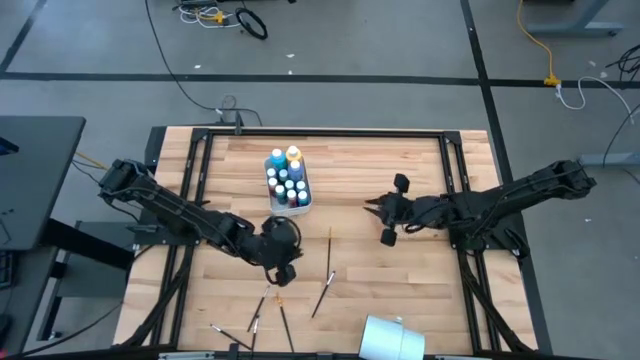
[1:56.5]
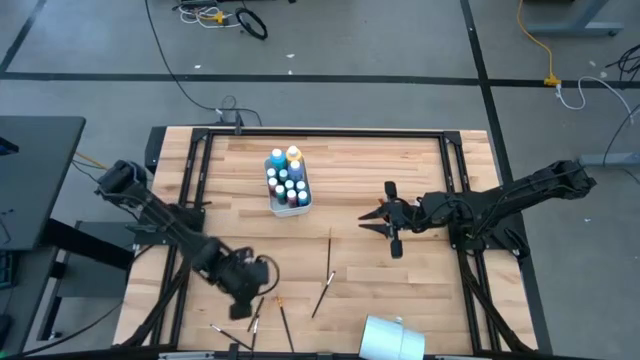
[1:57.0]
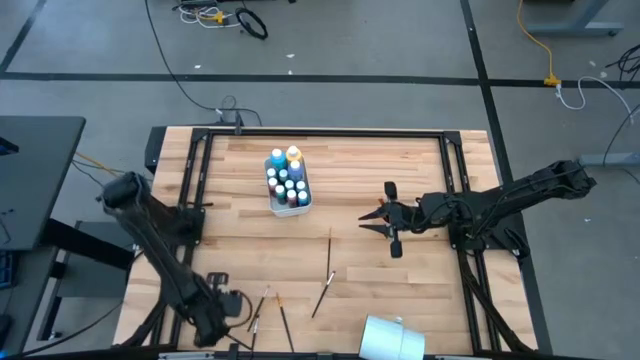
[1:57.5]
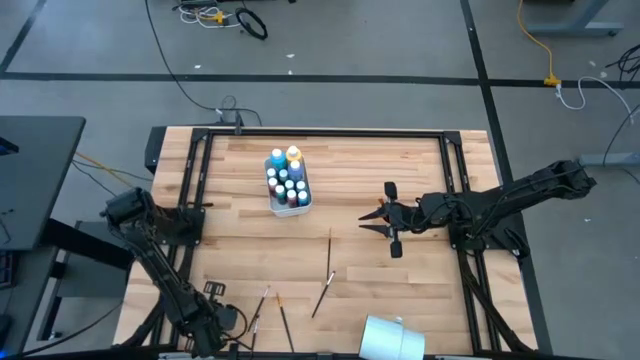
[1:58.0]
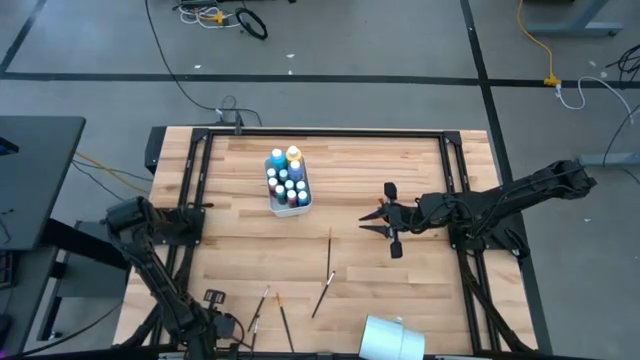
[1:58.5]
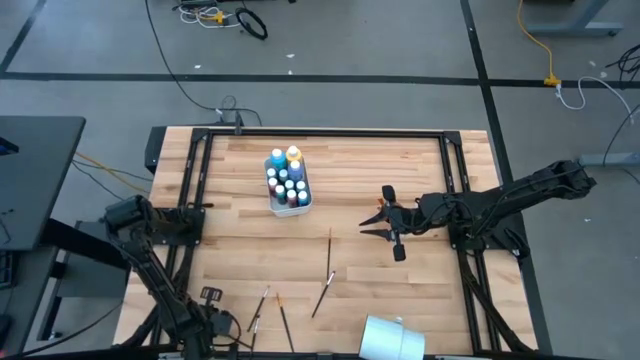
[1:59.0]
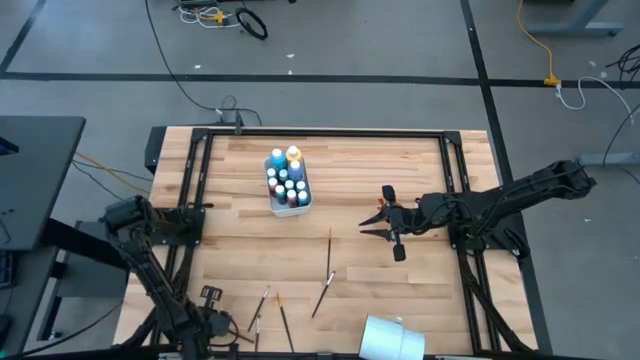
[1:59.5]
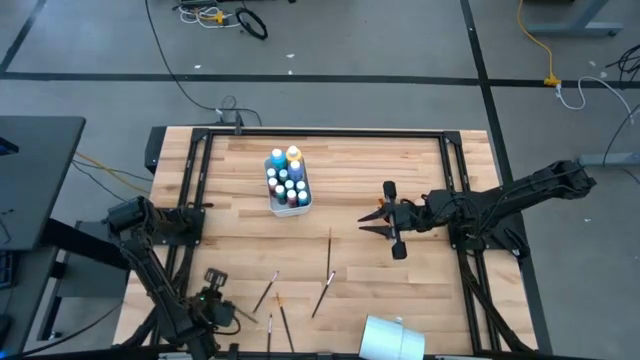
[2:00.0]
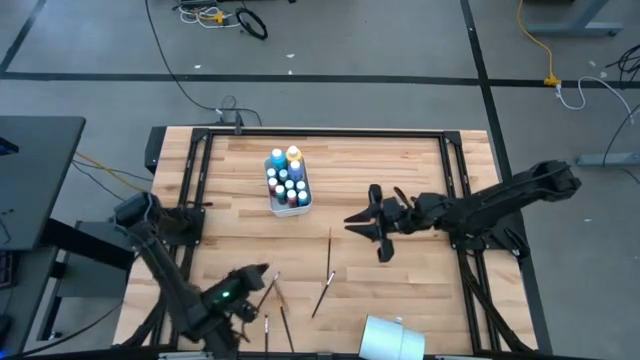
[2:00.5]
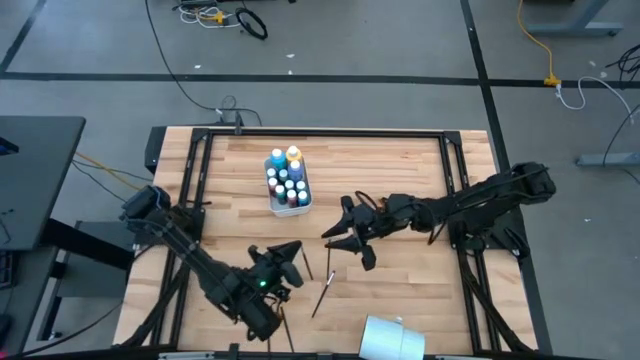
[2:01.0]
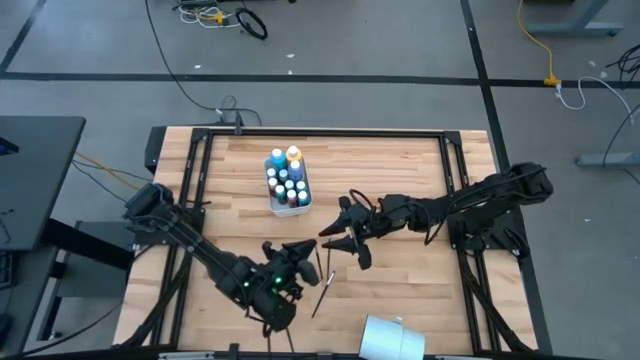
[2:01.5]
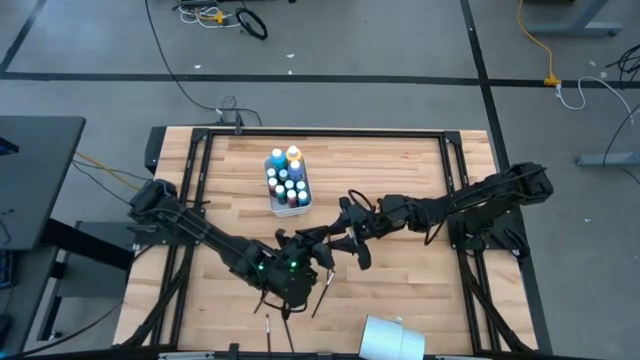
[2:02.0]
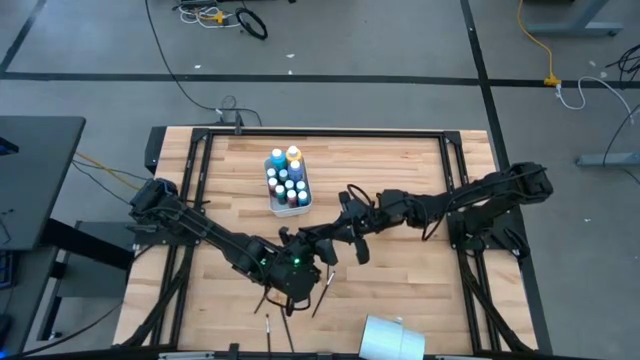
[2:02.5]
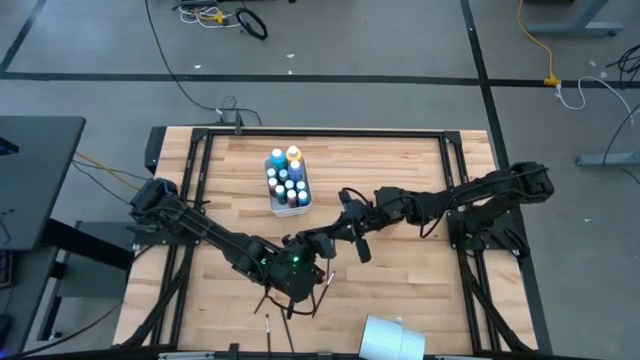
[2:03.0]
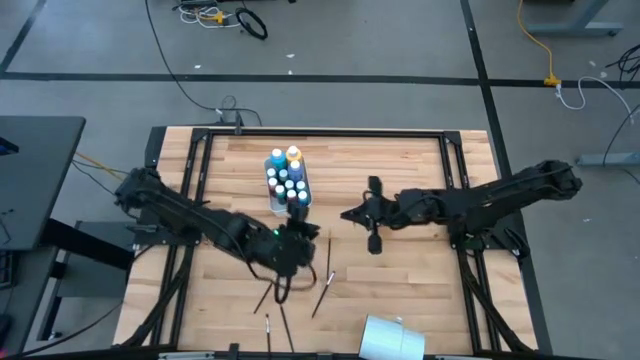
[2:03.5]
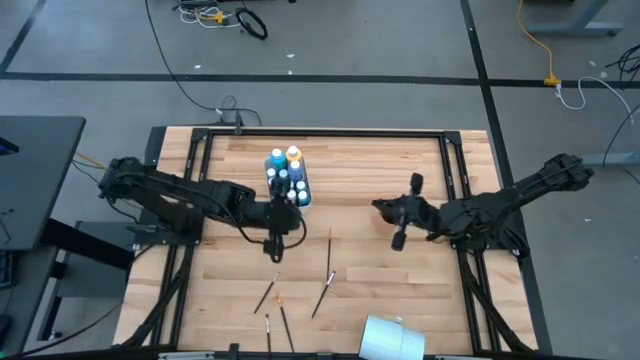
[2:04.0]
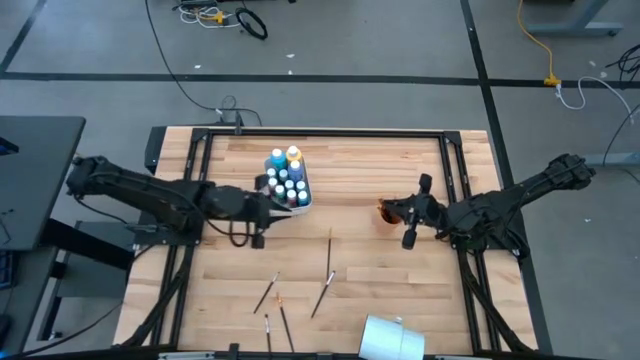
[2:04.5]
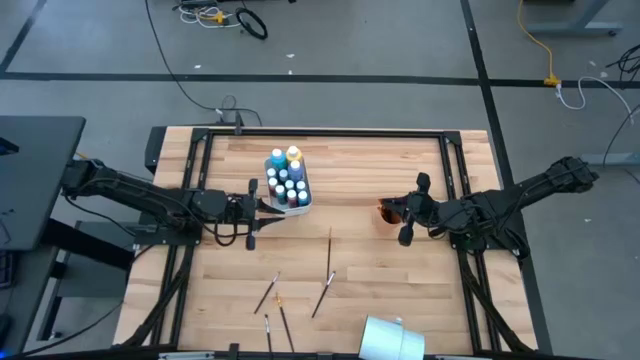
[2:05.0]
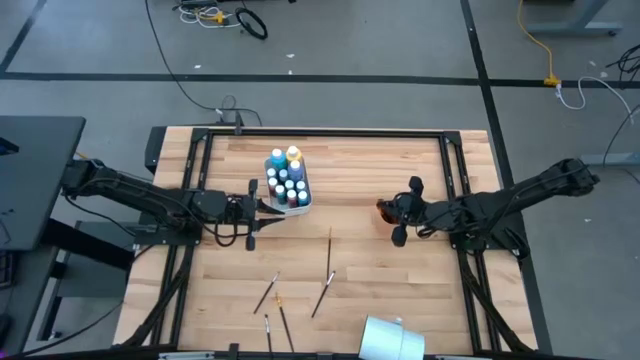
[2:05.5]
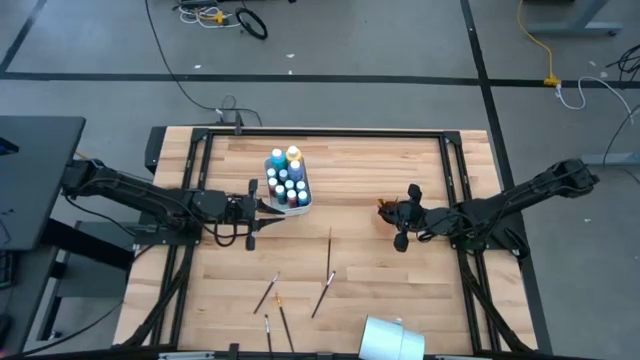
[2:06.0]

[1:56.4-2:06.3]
Task: Pick & Place Paint Supplies
Put the silver paint brush into the orange cup

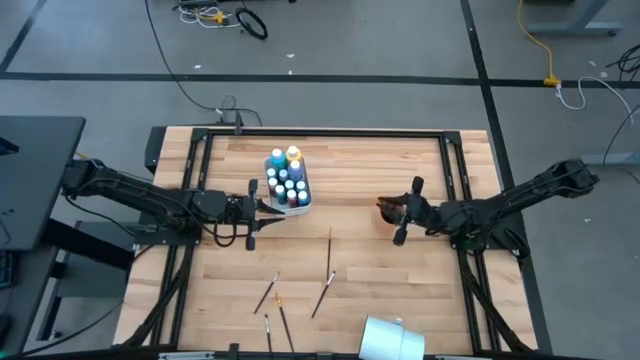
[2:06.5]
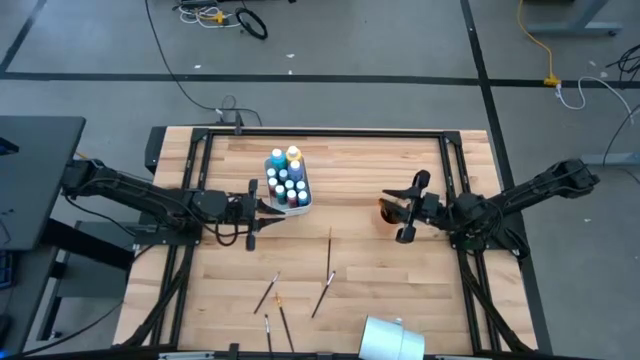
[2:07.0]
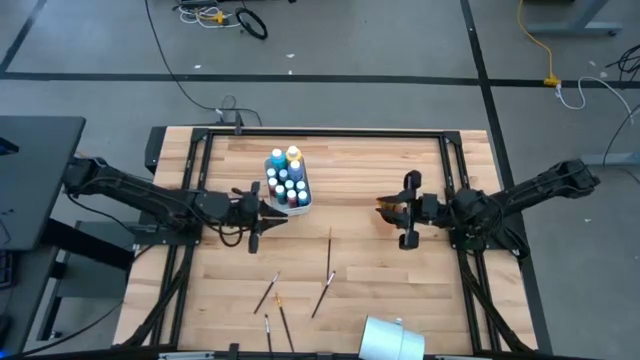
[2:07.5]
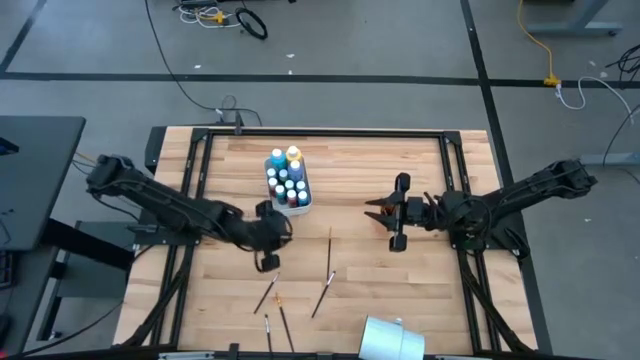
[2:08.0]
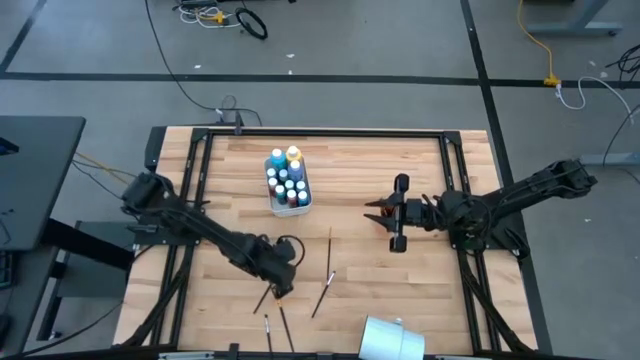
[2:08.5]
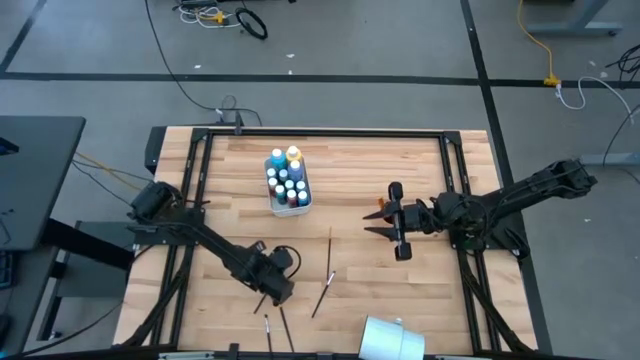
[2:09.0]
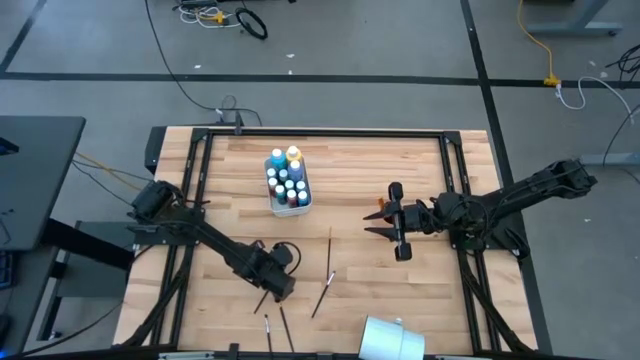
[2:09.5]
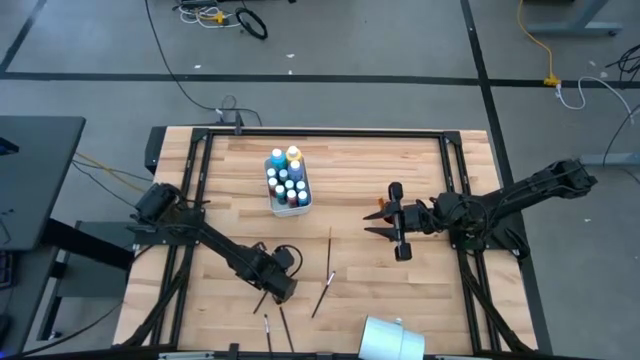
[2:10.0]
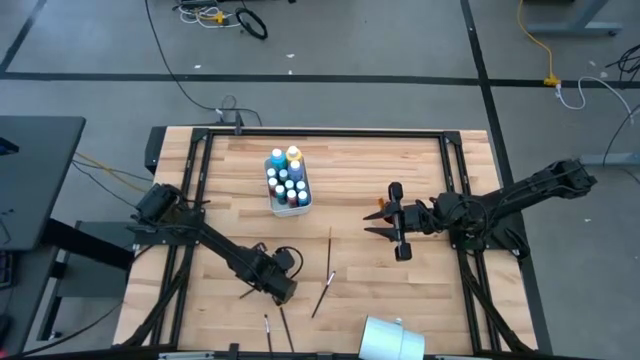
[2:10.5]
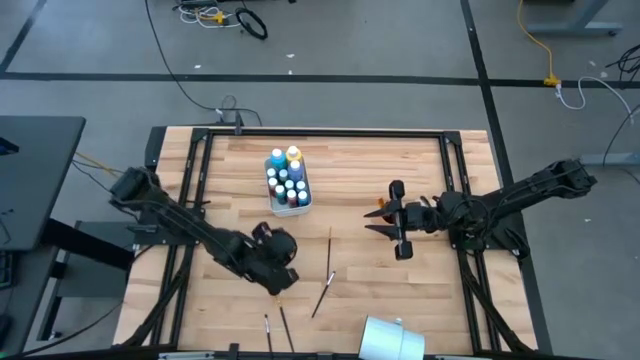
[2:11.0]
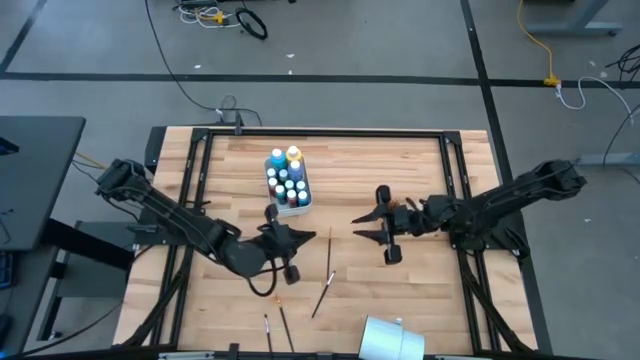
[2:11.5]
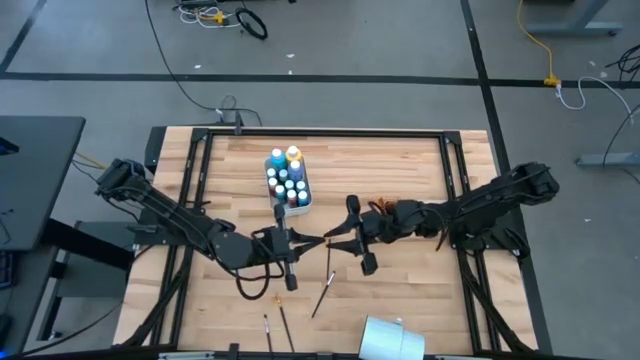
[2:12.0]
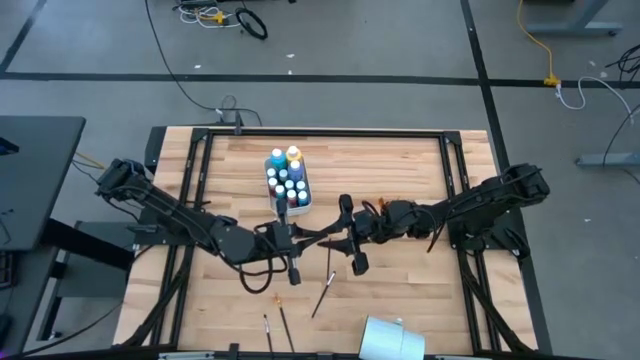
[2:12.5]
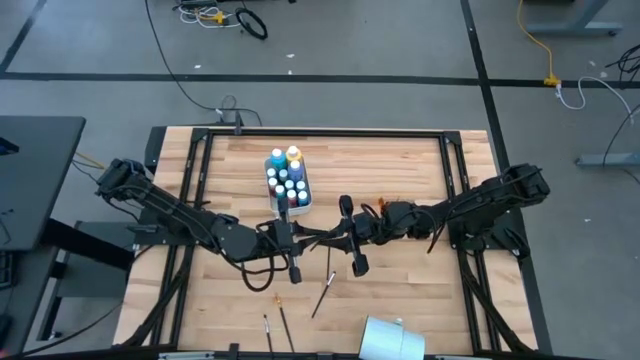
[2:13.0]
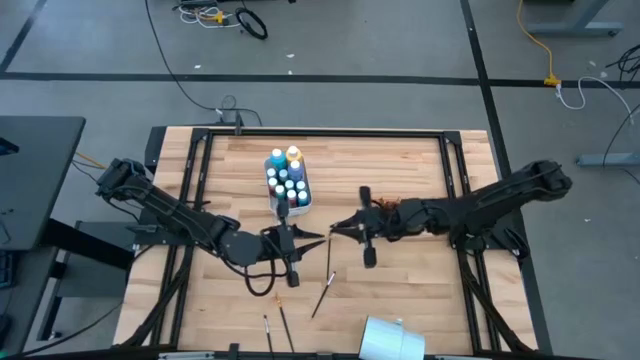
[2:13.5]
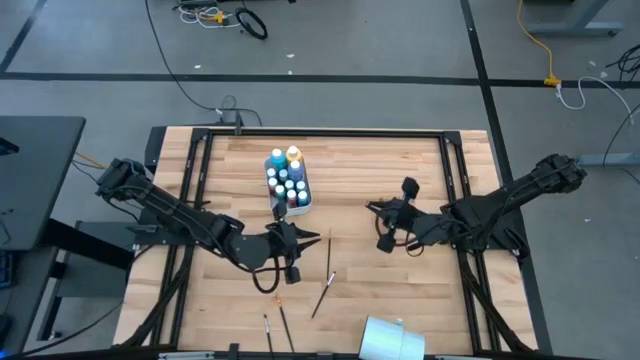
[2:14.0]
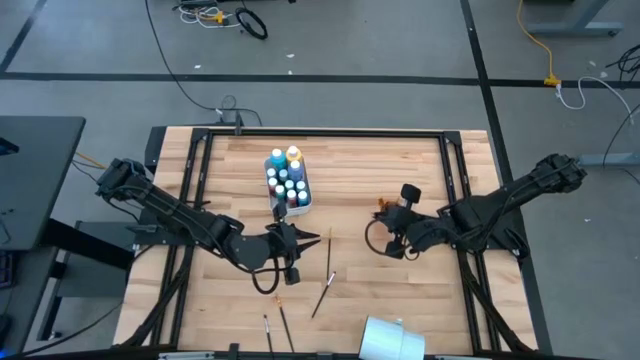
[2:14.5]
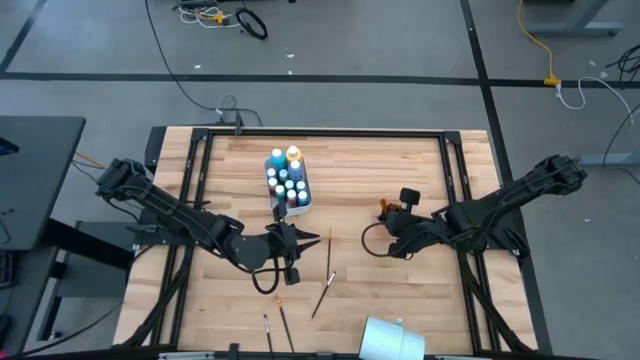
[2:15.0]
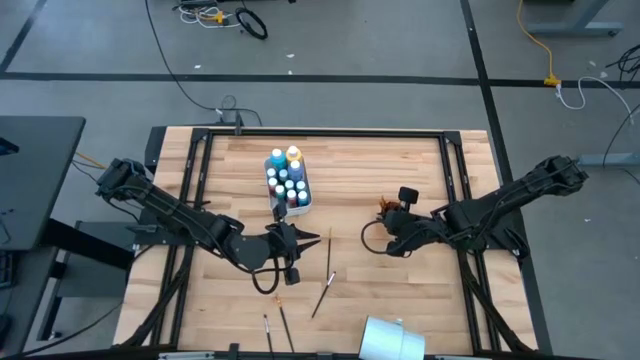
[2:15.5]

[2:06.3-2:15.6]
Put the silver paint brush into the orange cup

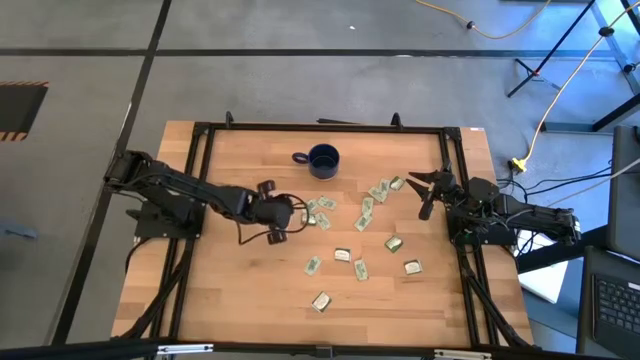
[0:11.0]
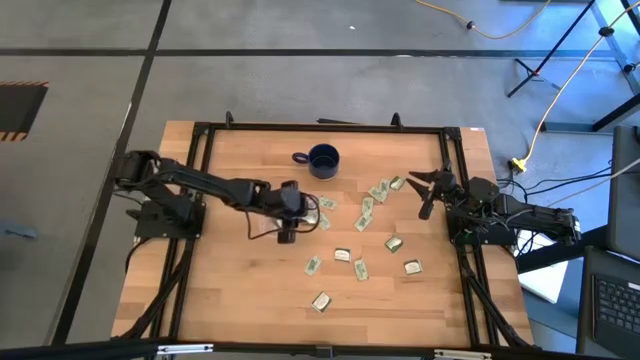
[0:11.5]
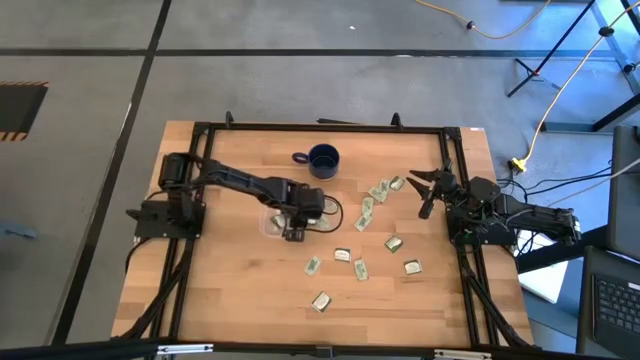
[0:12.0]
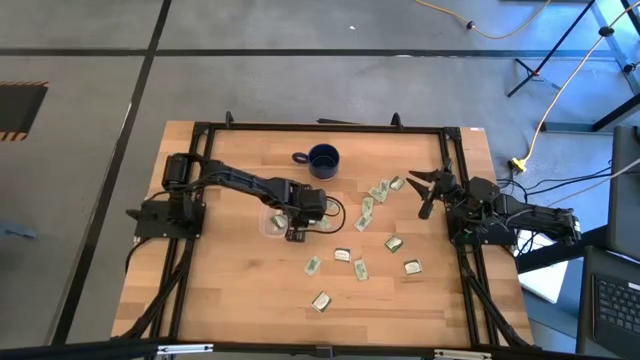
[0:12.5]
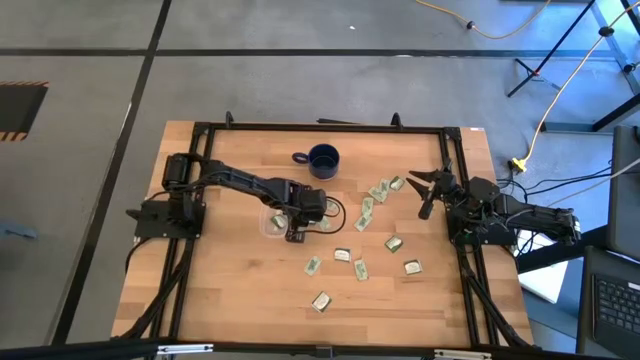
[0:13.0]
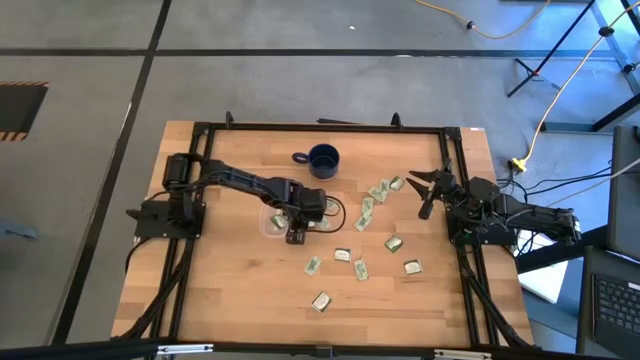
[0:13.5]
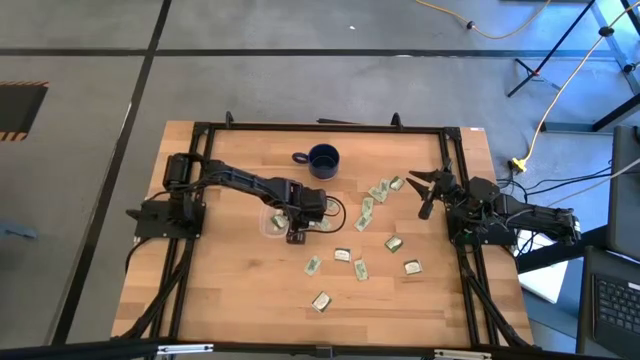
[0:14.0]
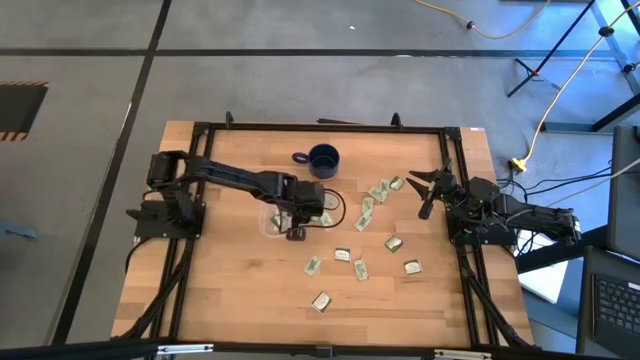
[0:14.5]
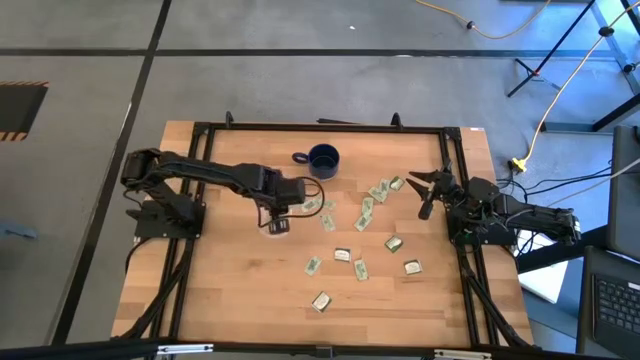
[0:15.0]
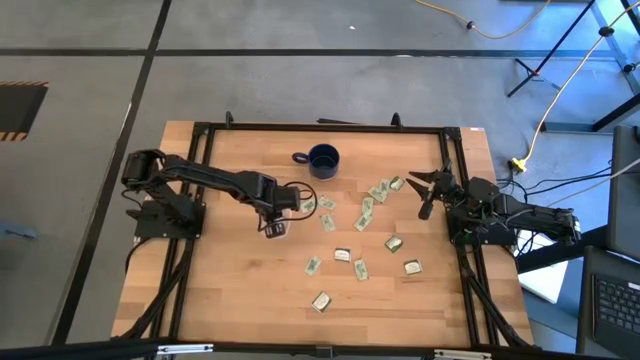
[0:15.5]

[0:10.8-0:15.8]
Task: Pick and place Stevia / Truvia into bins
Put the green stevia packet into the transparent container
